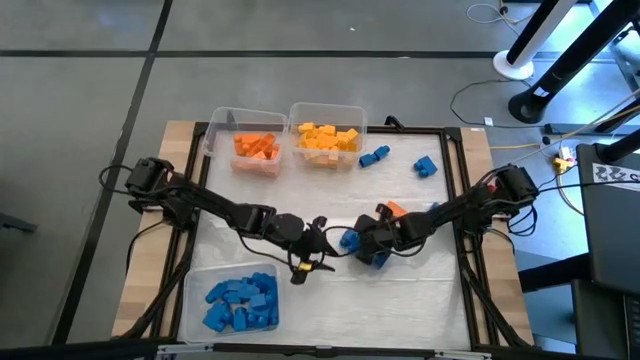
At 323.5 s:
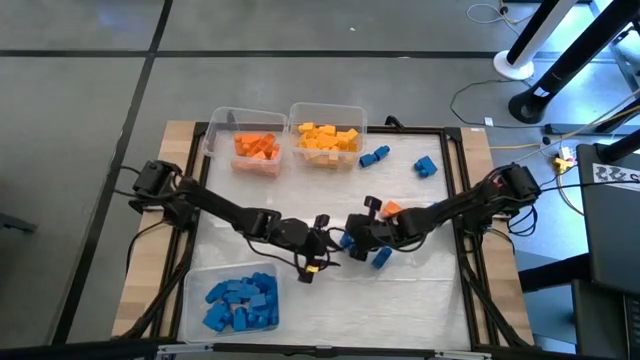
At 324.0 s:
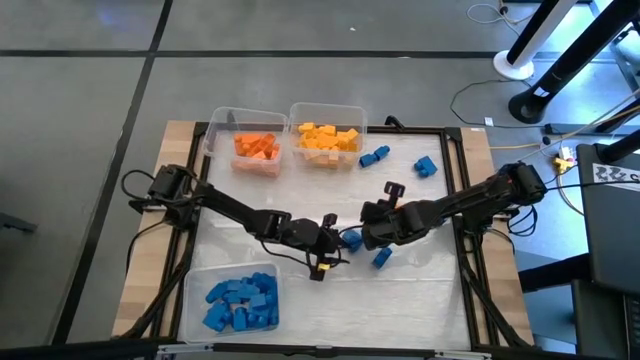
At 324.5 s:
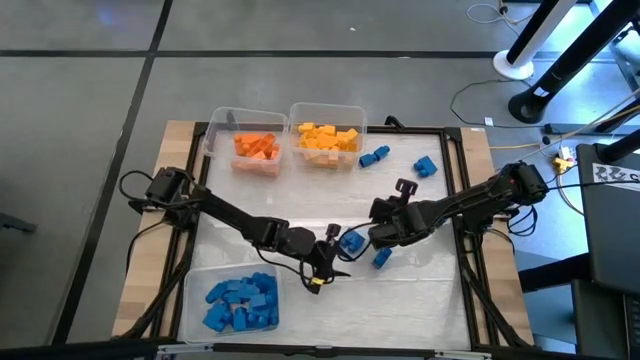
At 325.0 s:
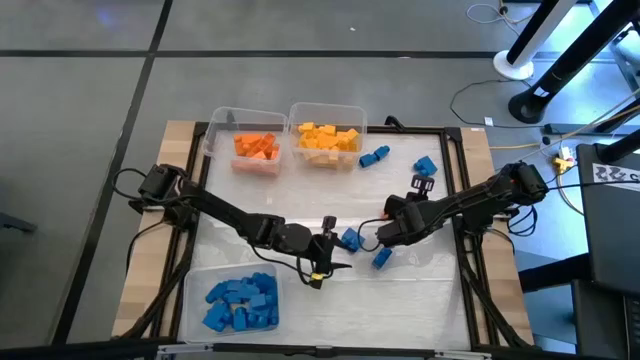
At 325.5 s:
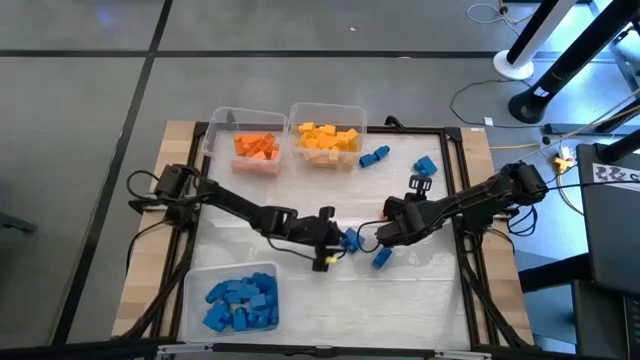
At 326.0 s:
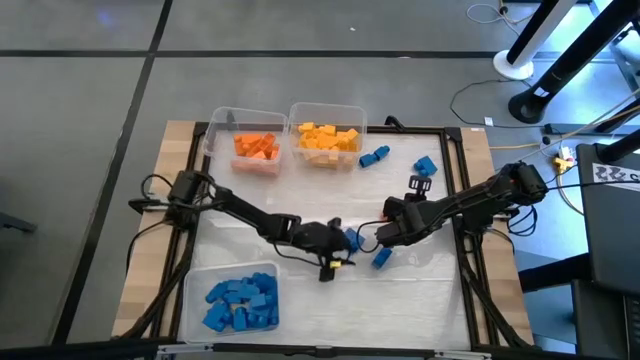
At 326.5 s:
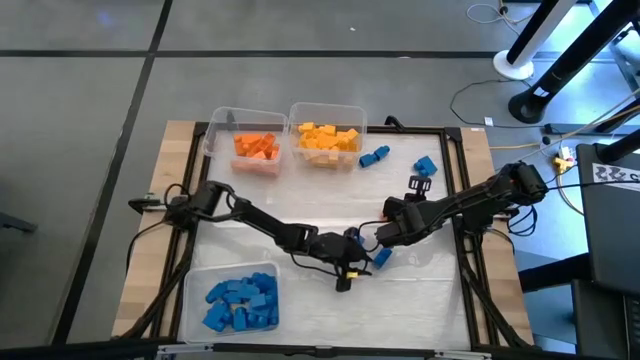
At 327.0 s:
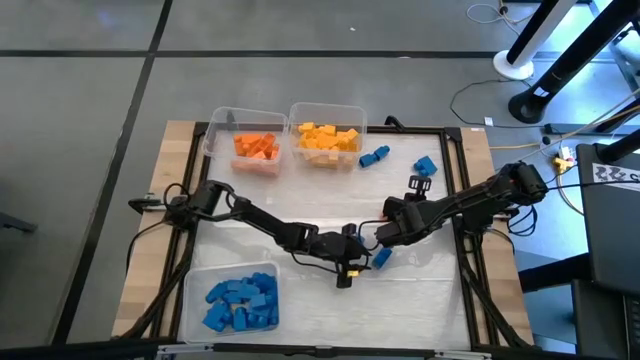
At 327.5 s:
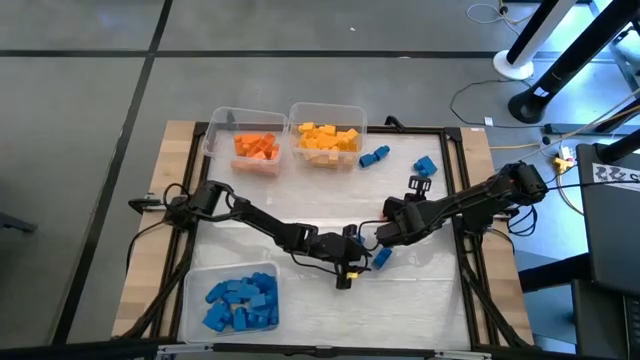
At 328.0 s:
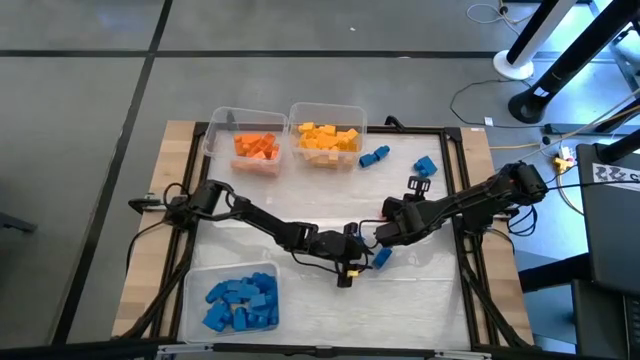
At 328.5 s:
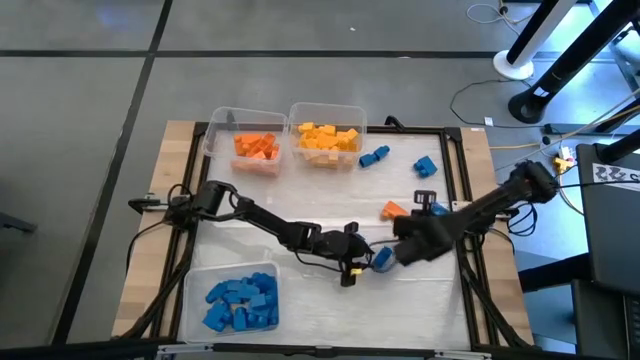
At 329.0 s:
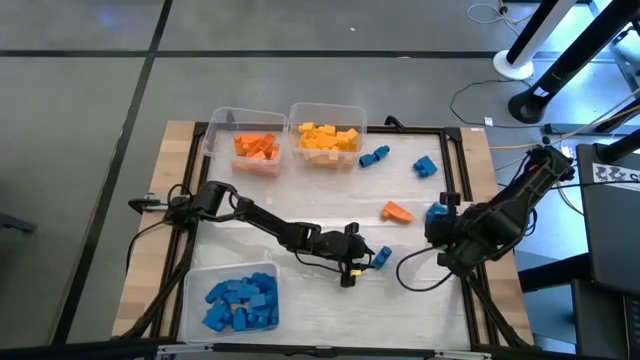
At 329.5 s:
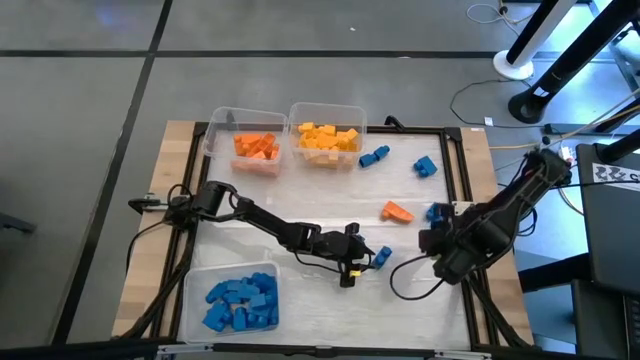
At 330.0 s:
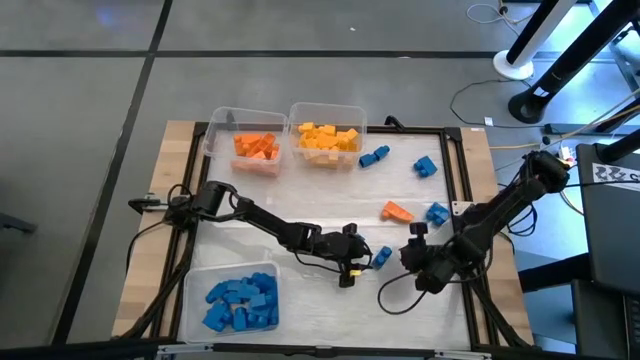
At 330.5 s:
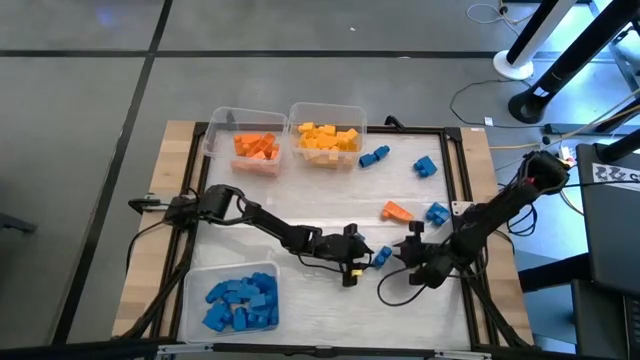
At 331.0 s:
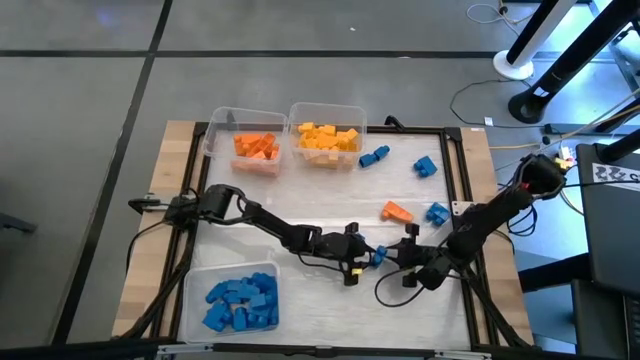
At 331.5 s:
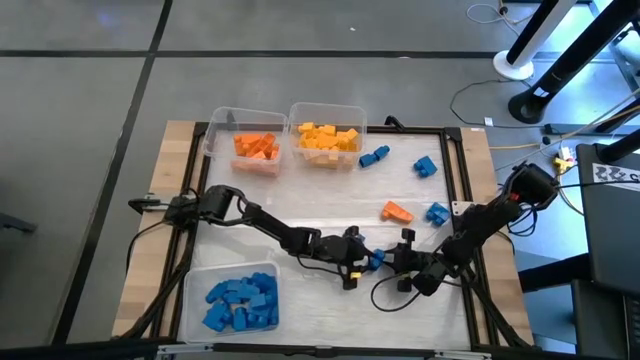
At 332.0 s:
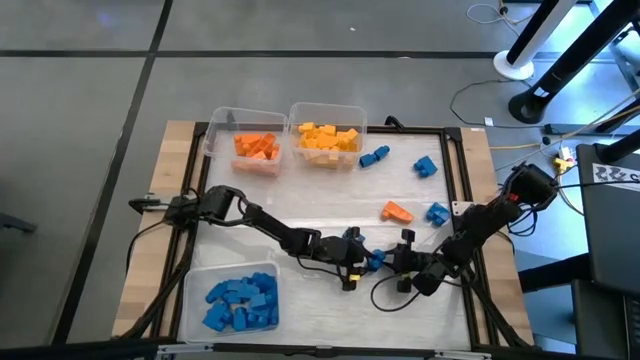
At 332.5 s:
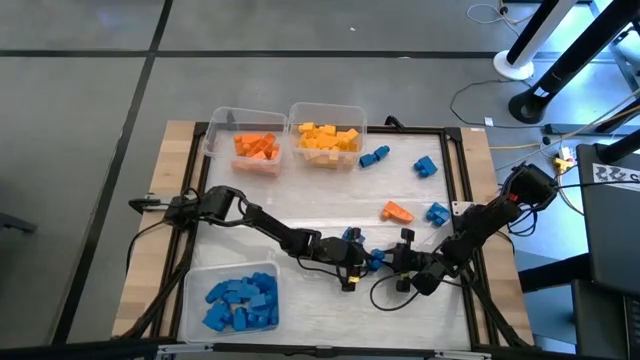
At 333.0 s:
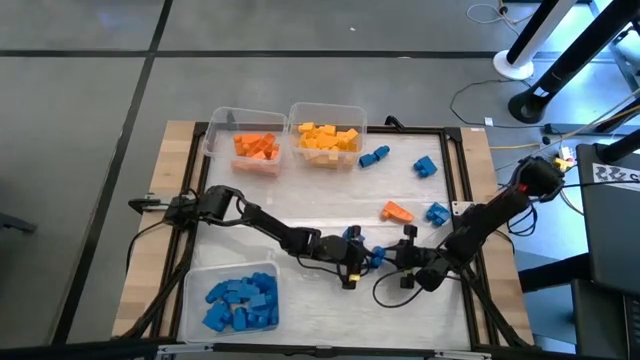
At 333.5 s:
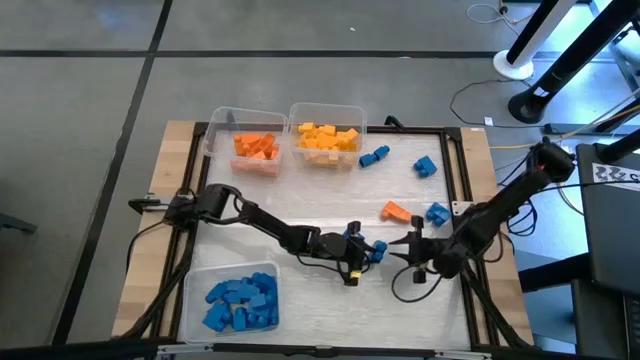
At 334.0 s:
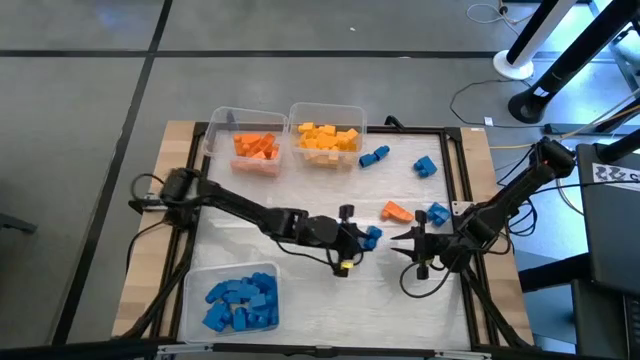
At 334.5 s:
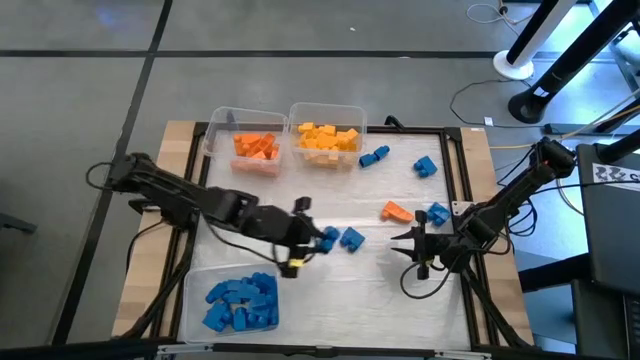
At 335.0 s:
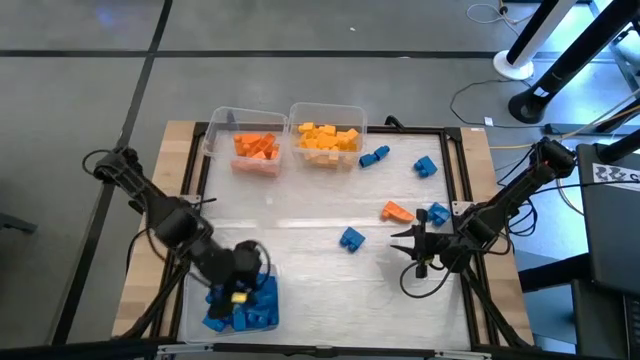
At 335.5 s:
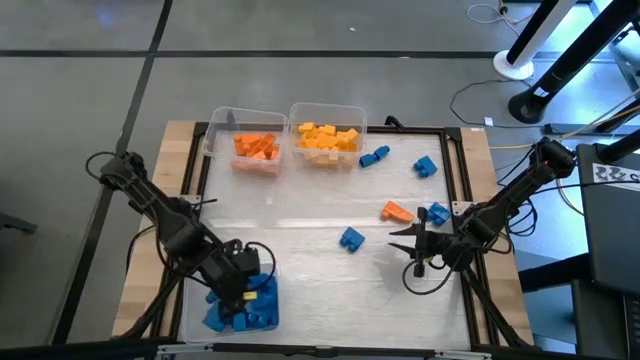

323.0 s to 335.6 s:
Task: Sort blocks
Put the blue game piece into the bottom transparent bin

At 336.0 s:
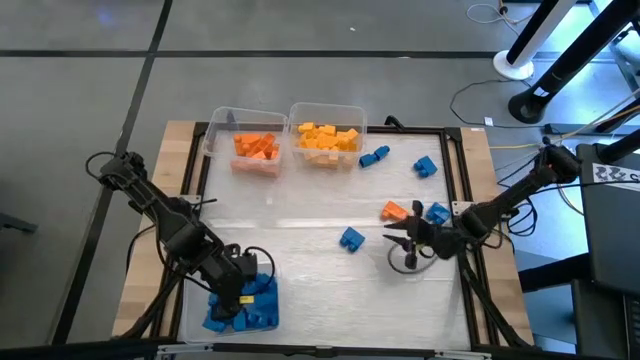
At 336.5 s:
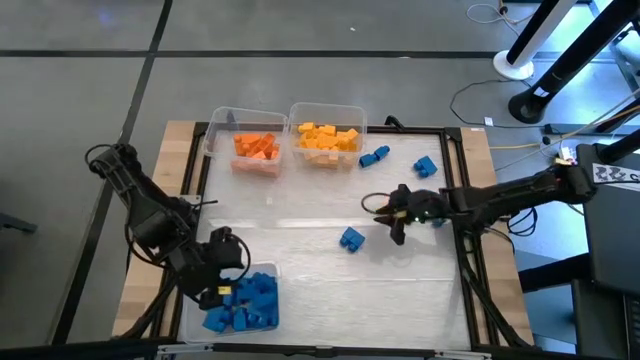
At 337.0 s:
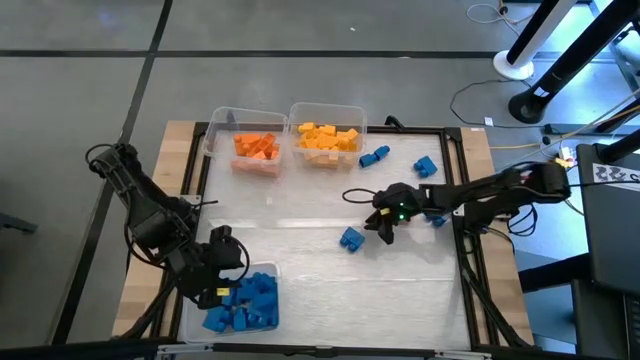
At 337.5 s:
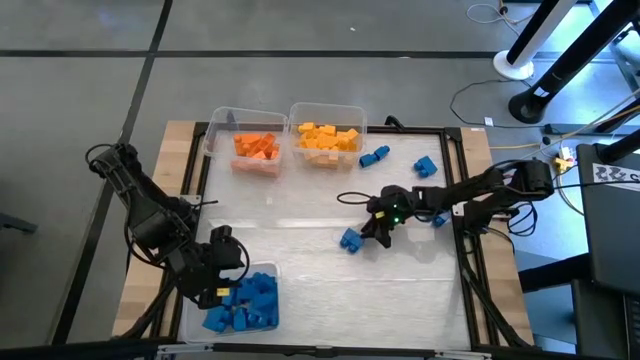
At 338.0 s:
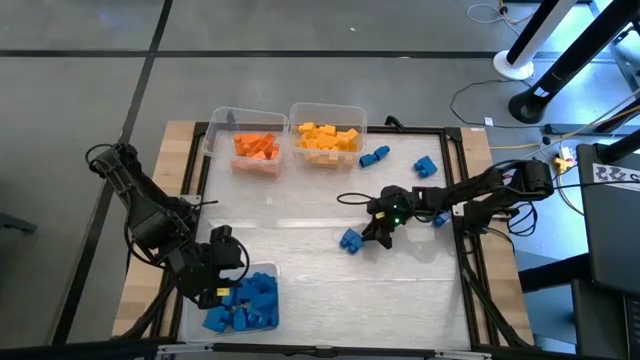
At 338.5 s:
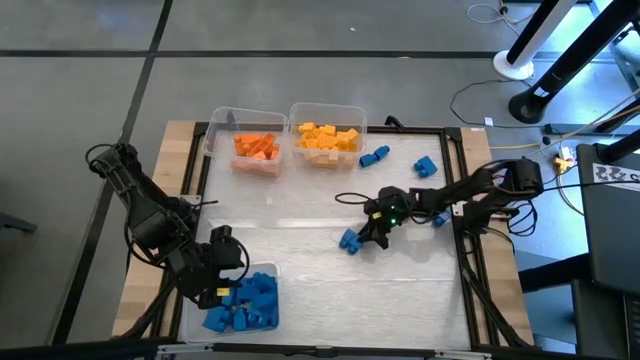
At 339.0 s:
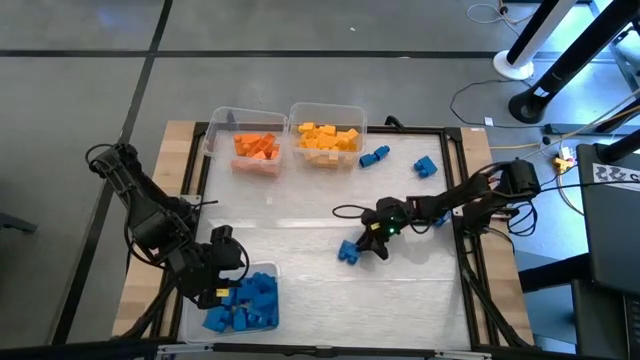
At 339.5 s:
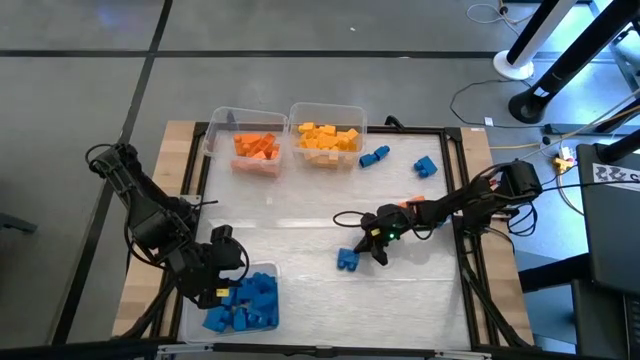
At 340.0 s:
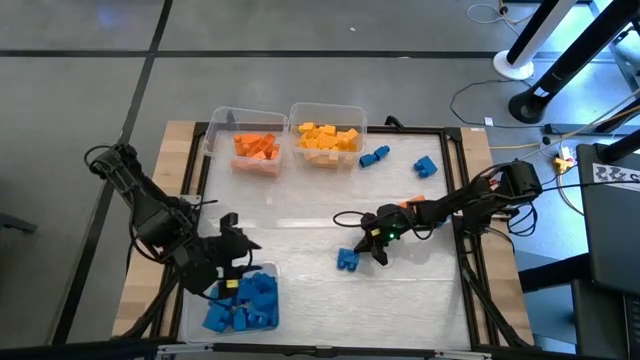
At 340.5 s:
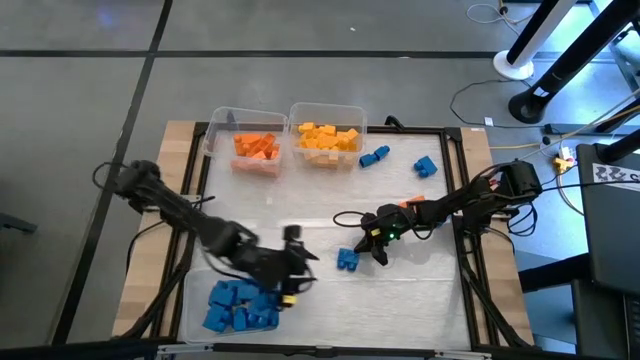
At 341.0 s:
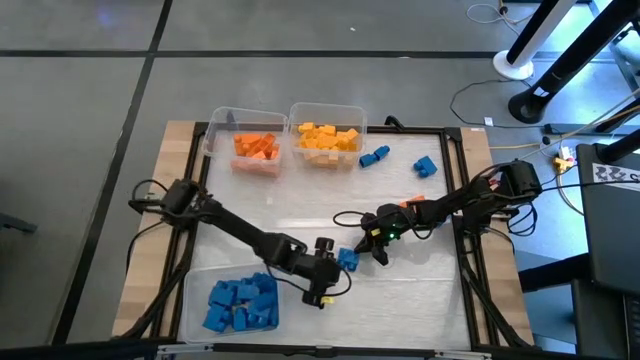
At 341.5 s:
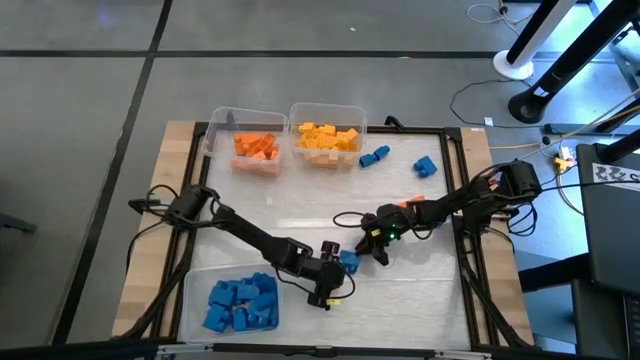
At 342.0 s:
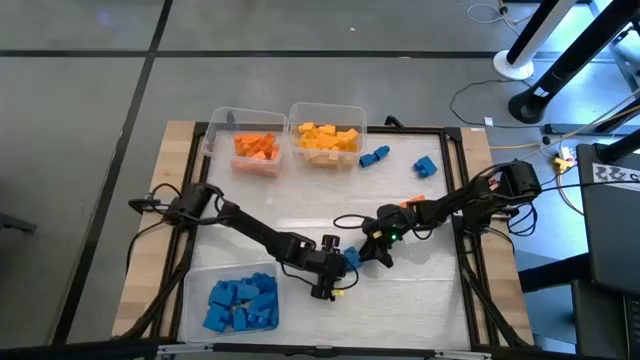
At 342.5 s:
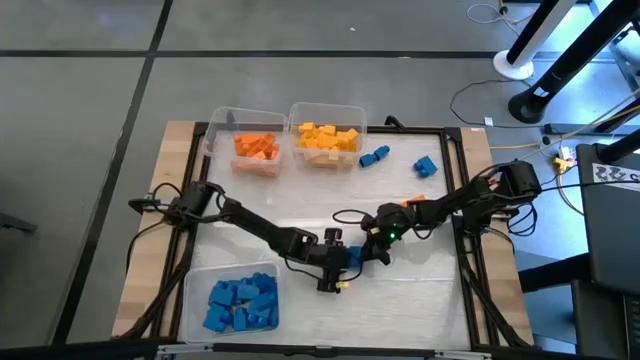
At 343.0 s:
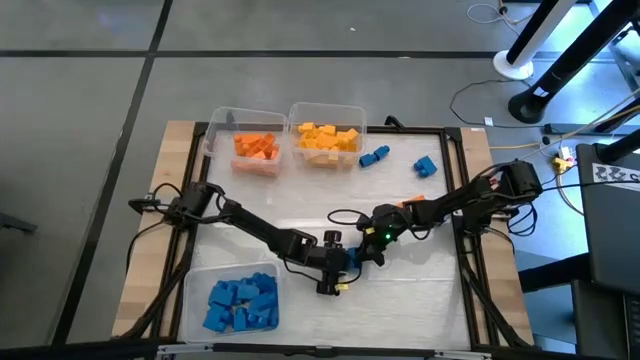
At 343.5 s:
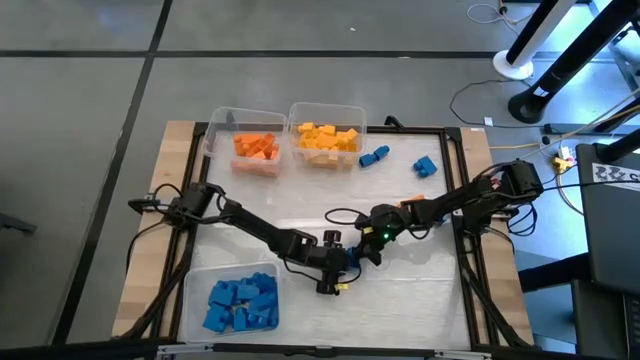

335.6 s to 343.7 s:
Put the blue game piece into the bottom transparent bin

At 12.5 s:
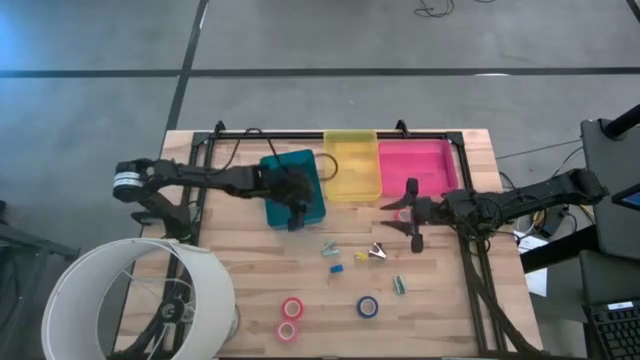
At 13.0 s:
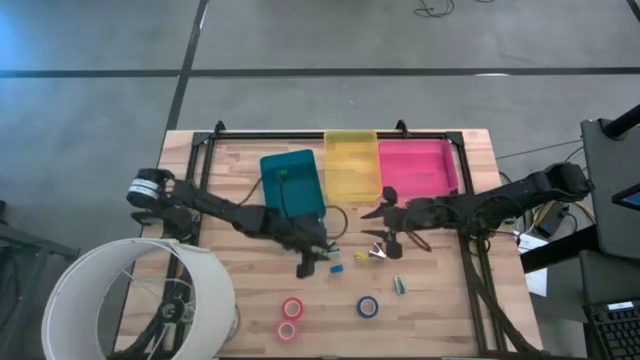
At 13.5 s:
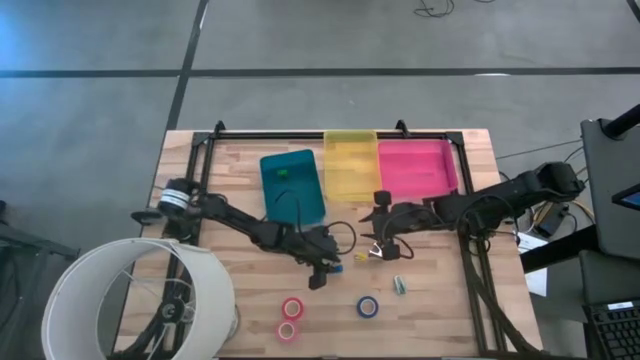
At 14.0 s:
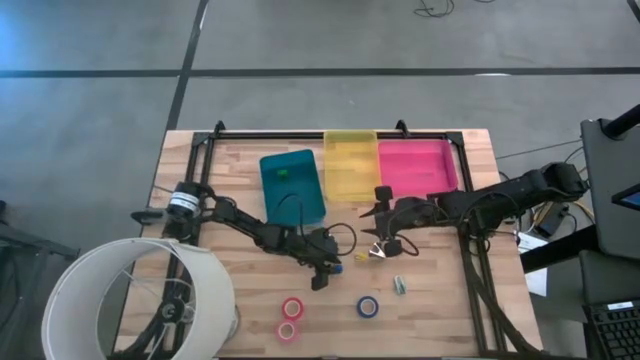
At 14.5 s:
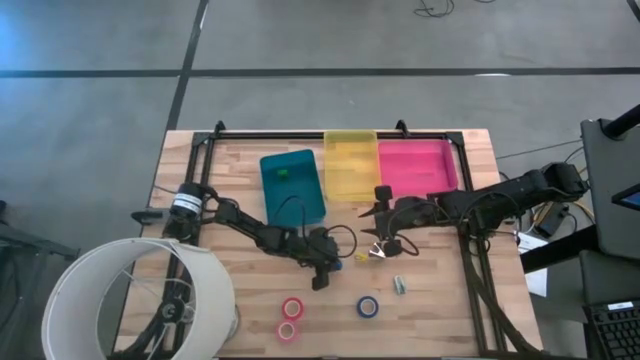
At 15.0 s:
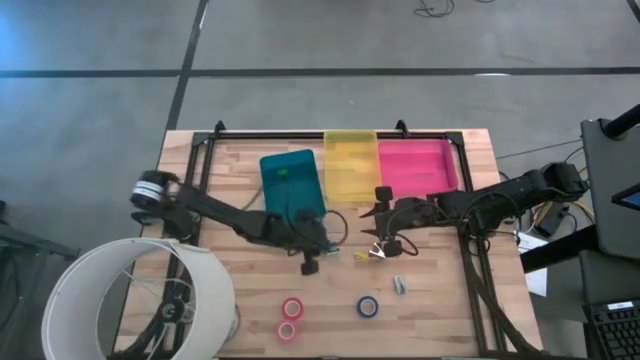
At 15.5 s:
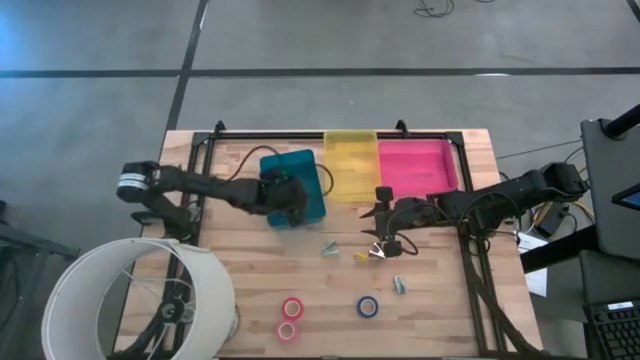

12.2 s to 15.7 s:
Task: Pick and place Stapler, Stapler remover, tape
Put the blue stapler into the blue bin
